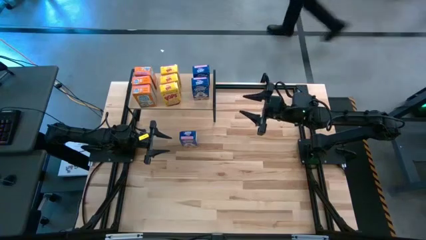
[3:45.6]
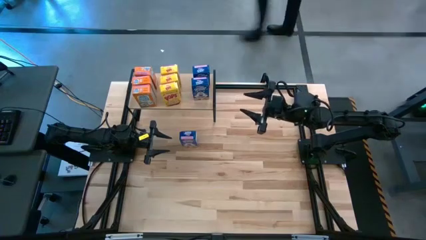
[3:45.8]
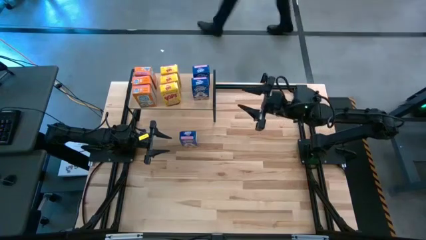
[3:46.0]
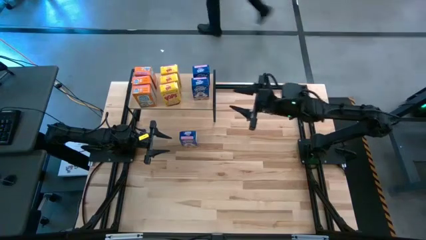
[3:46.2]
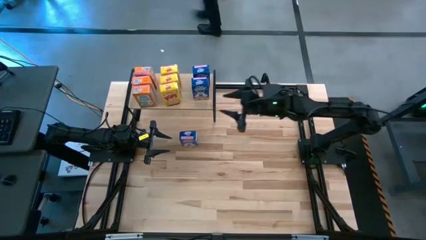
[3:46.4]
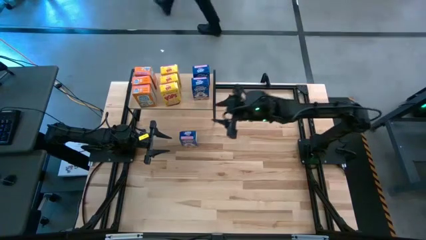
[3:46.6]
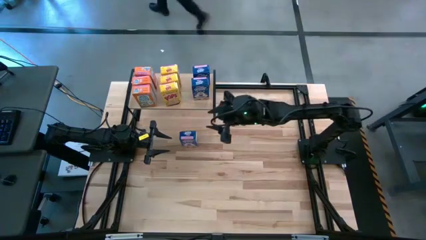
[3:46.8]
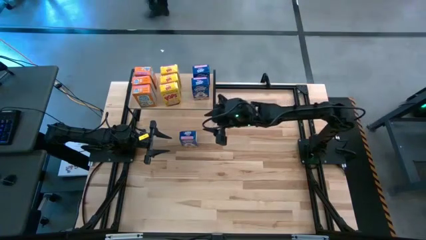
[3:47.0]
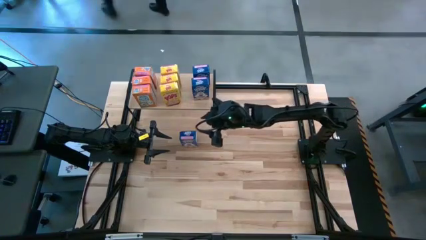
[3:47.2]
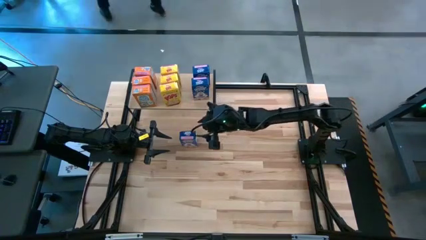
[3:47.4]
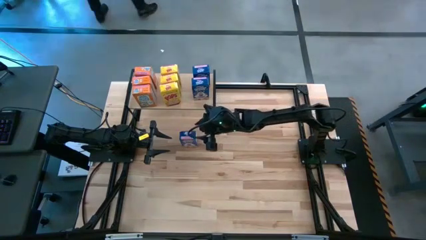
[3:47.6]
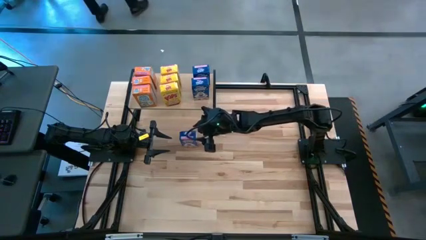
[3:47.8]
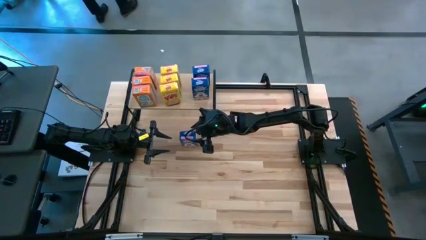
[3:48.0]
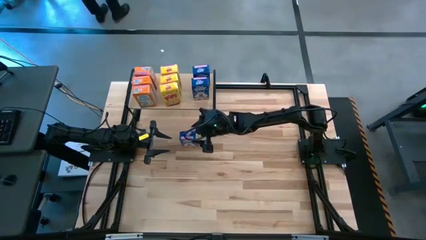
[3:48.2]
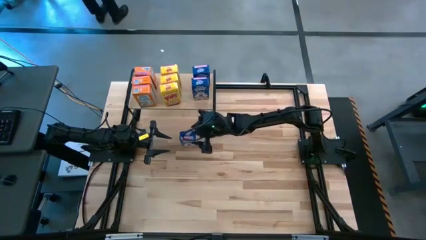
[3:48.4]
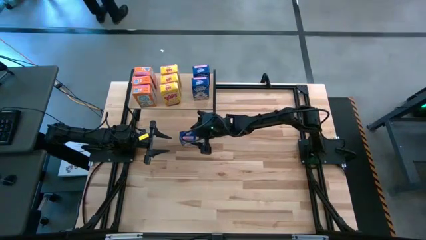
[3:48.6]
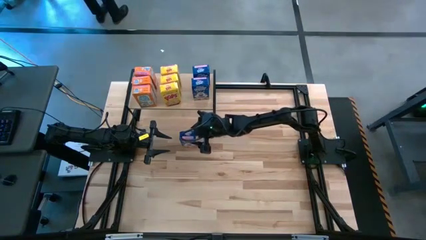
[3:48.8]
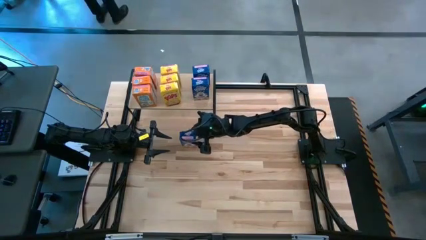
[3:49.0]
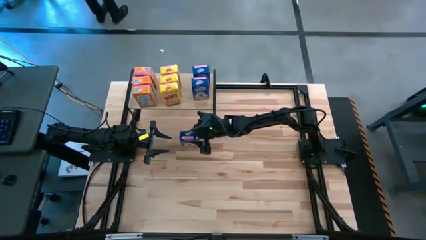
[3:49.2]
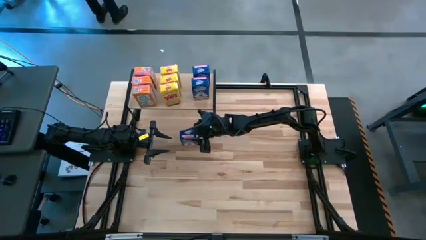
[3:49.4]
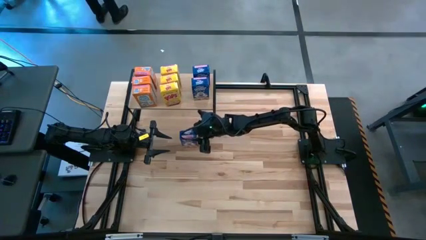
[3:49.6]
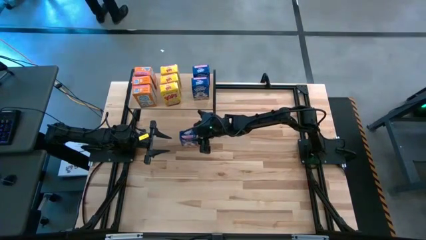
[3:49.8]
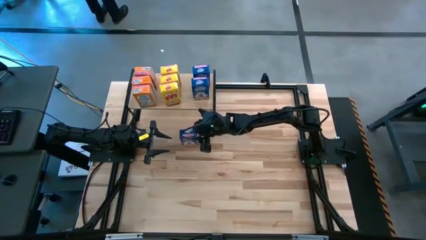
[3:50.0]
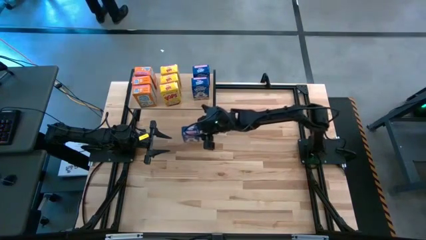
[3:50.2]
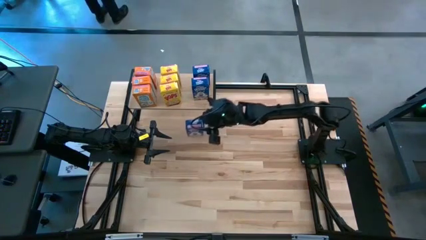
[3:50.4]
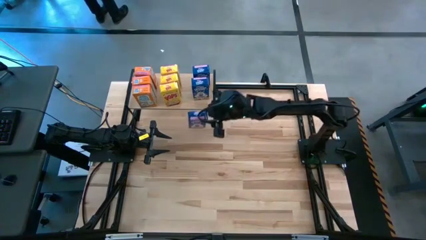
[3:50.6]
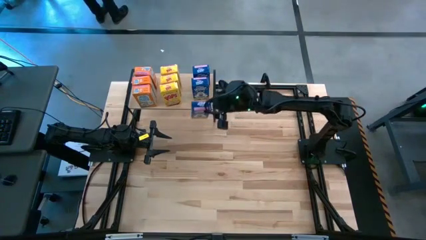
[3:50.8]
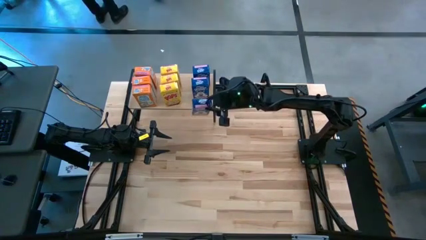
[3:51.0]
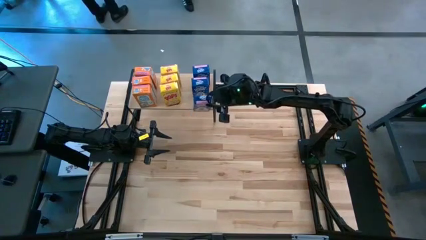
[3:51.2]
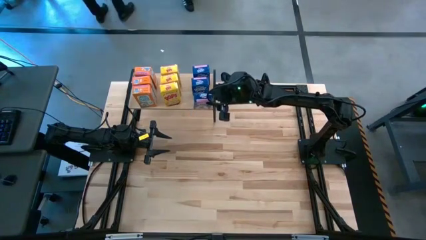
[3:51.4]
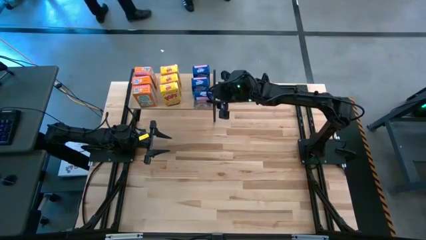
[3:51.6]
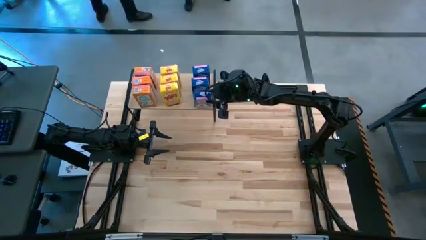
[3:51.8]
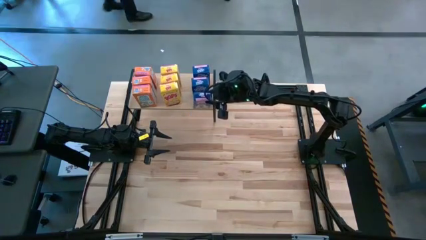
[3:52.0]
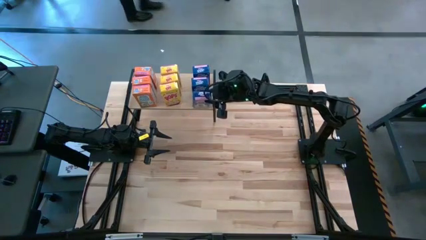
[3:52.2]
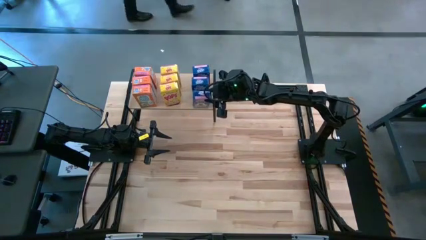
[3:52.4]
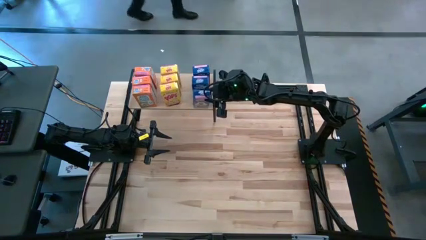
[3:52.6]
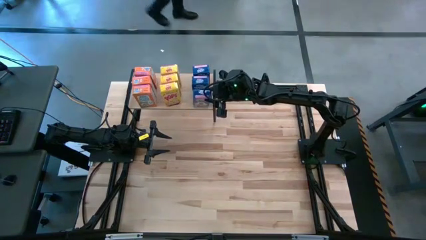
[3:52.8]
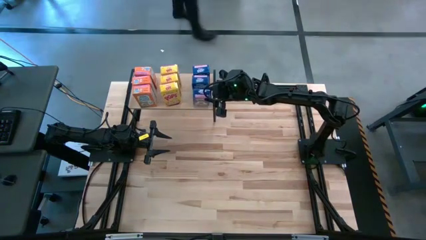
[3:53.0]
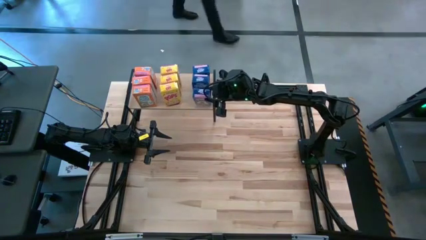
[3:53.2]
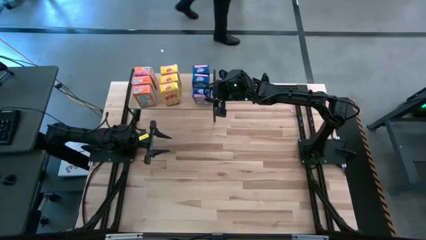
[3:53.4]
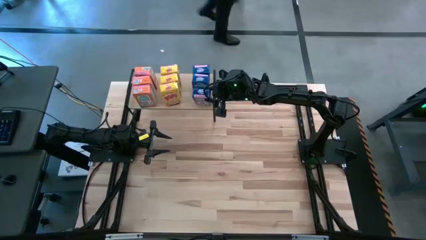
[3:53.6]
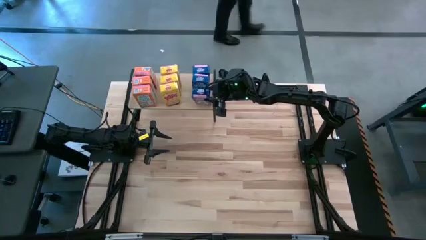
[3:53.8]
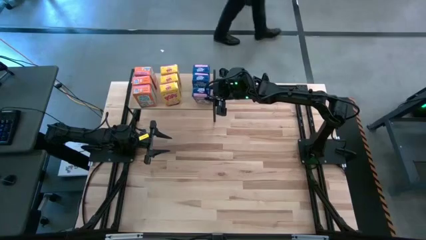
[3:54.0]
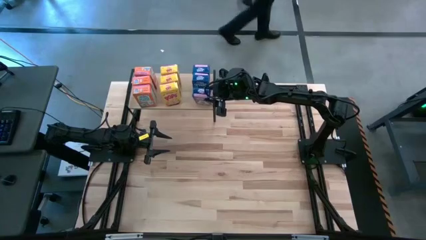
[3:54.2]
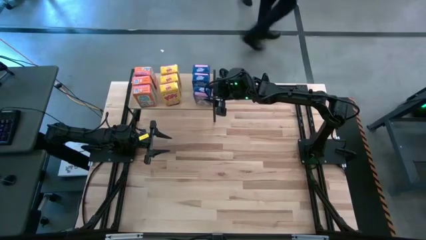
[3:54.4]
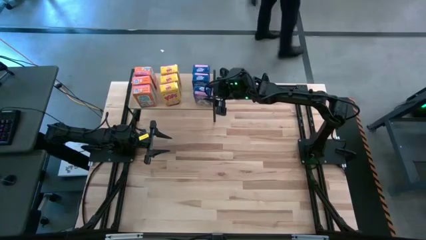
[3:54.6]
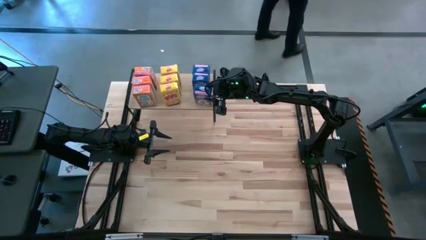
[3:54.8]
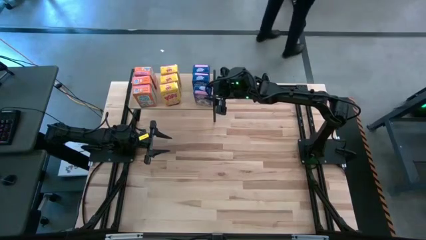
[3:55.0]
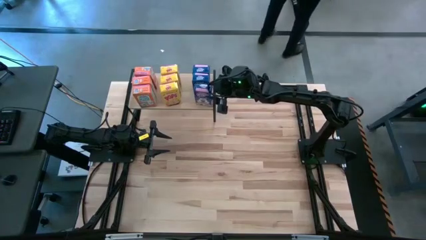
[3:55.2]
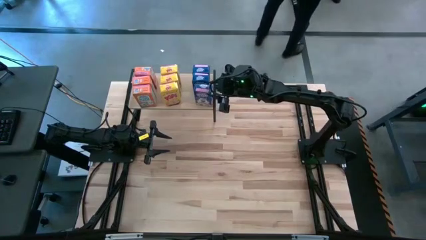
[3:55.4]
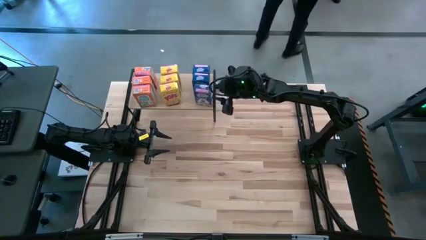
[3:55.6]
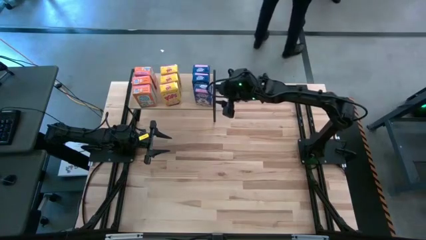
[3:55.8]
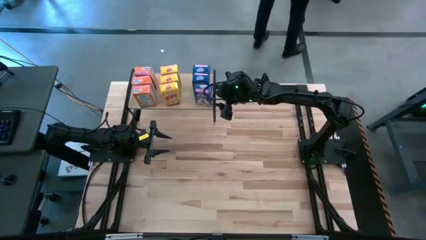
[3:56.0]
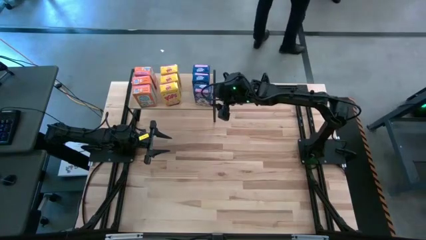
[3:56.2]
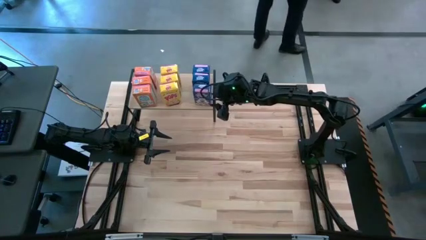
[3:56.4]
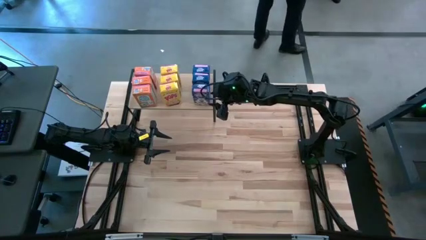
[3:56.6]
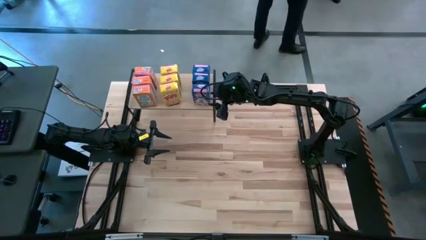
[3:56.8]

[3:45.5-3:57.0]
Task: Stack cereal on shelf
Put the blue cereal box on the shelf aligned with the other blue cereal boxes

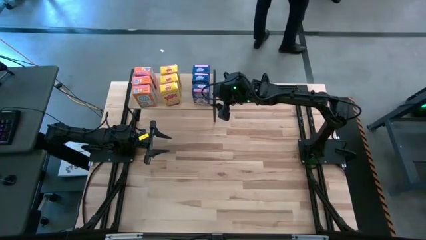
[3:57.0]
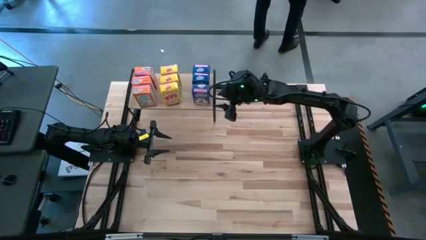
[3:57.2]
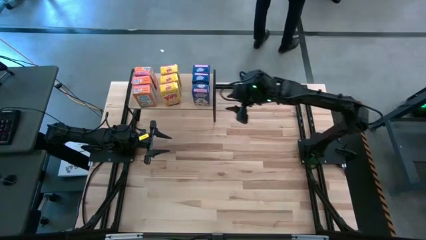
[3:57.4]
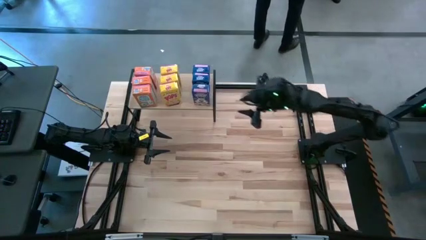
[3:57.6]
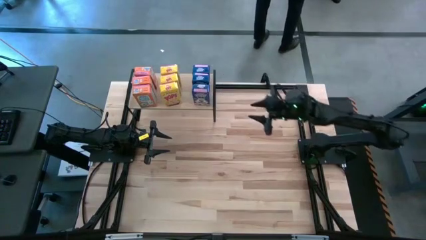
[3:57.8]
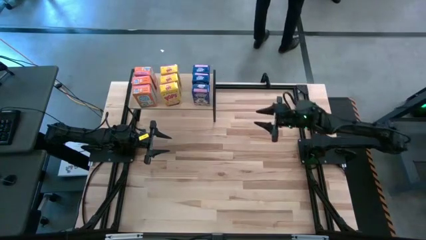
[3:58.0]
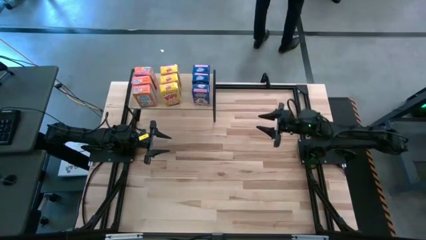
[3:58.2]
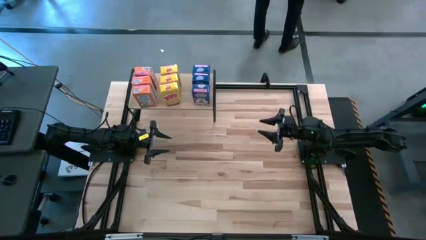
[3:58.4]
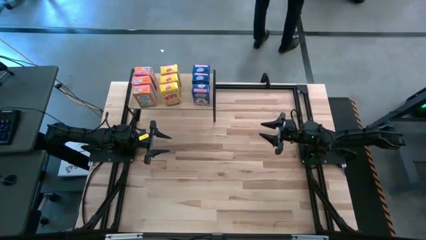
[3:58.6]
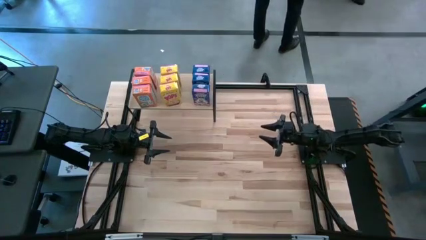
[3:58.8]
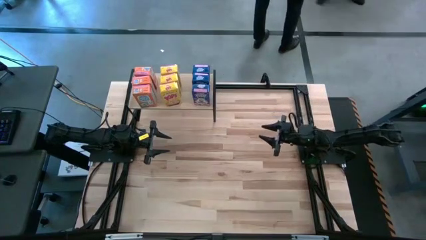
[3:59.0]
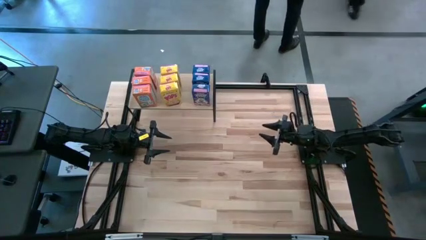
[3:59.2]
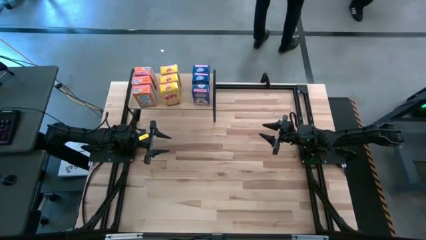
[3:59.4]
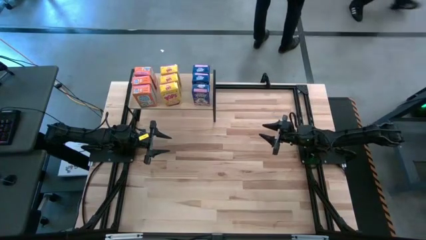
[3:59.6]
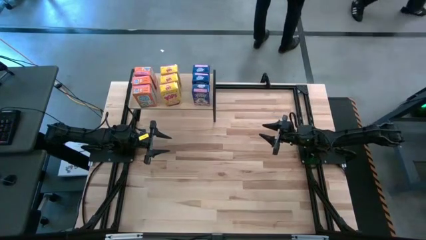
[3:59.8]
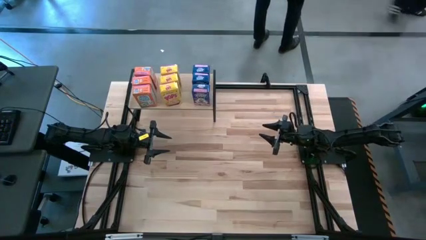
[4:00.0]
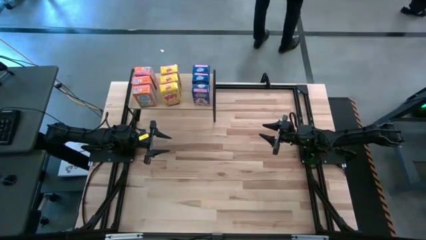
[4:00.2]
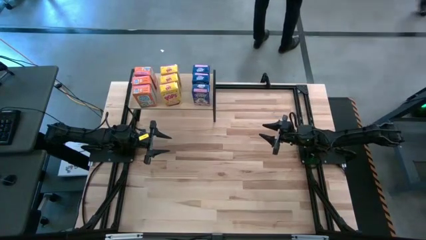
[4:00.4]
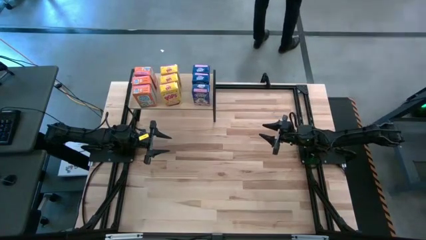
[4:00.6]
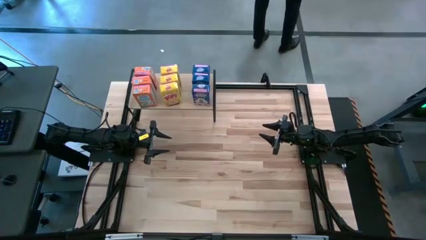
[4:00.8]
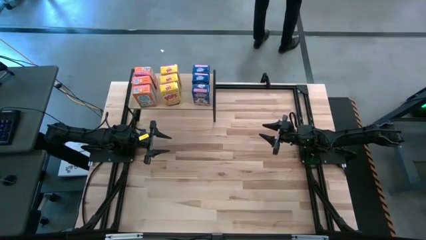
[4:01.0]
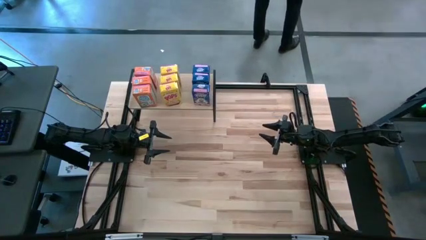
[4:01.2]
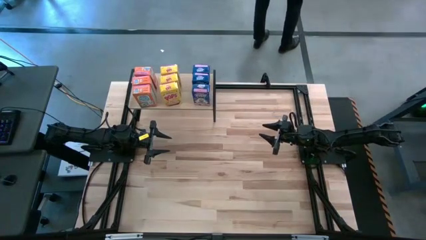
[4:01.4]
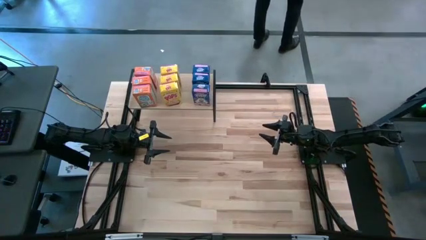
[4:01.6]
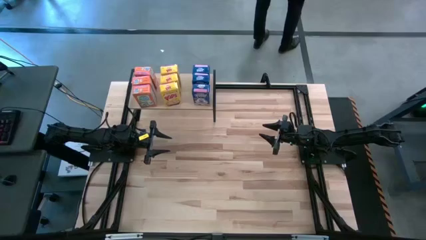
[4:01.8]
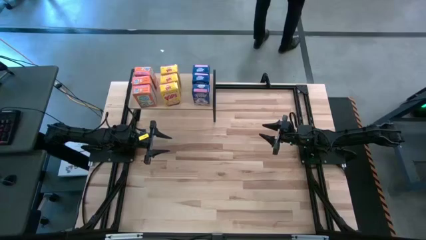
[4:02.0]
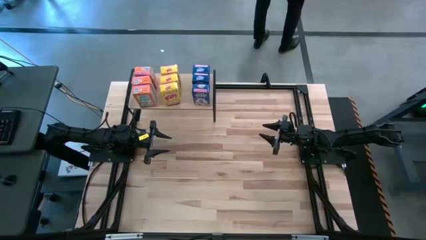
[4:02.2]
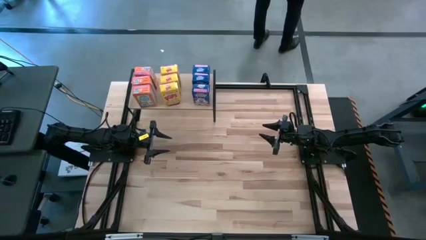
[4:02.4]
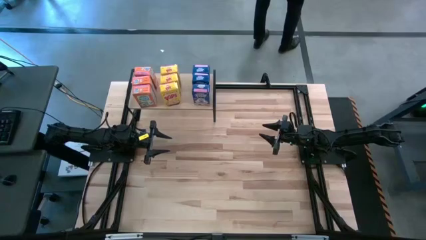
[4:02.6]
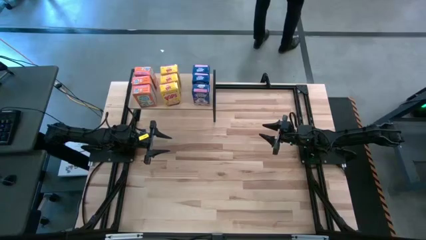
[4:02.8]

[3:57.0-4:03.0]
Return to Home Position
